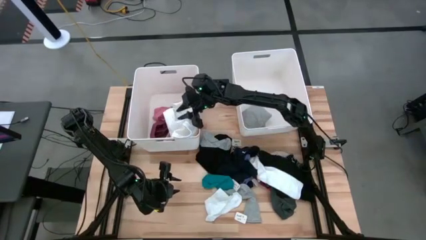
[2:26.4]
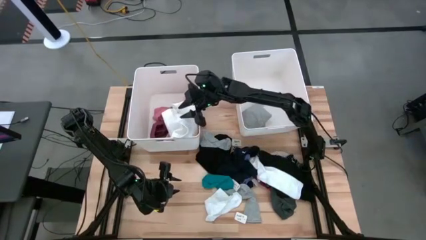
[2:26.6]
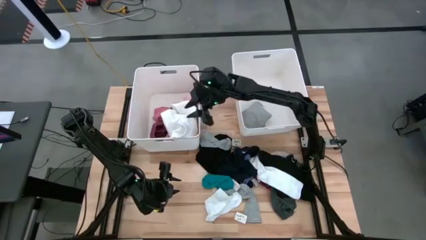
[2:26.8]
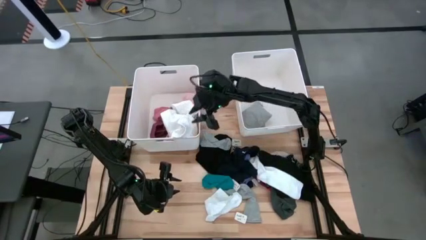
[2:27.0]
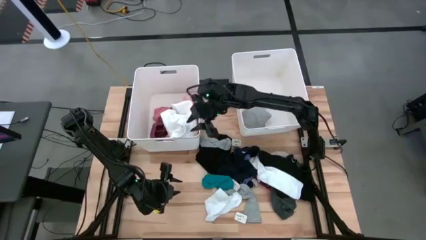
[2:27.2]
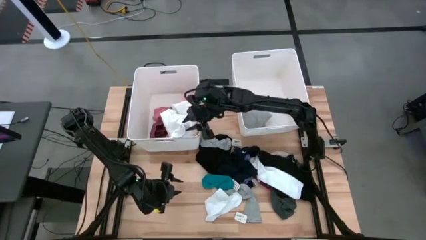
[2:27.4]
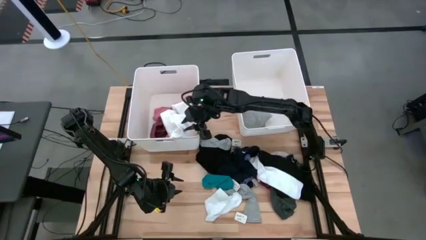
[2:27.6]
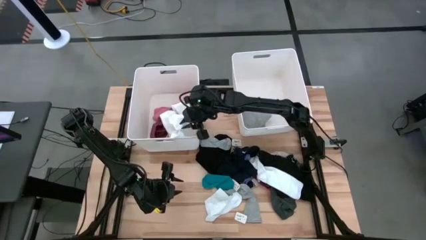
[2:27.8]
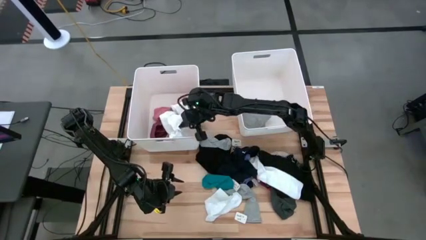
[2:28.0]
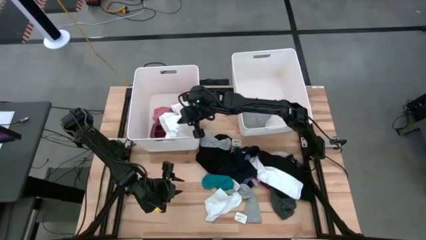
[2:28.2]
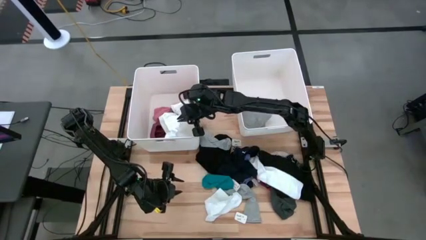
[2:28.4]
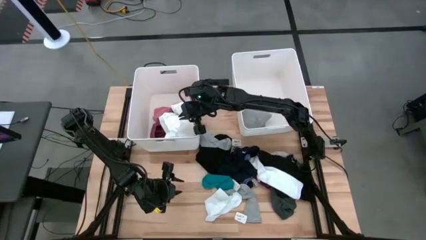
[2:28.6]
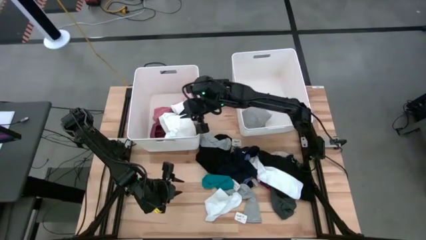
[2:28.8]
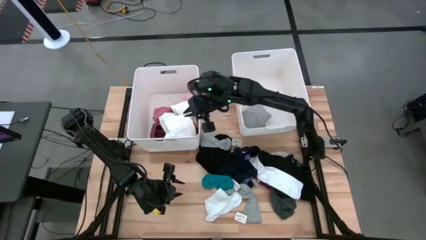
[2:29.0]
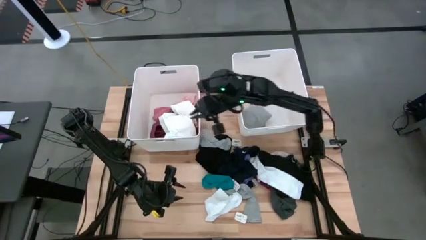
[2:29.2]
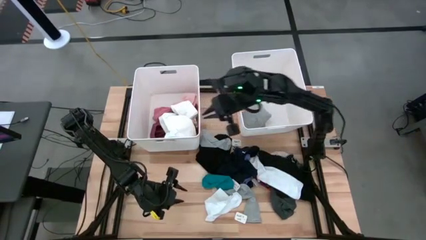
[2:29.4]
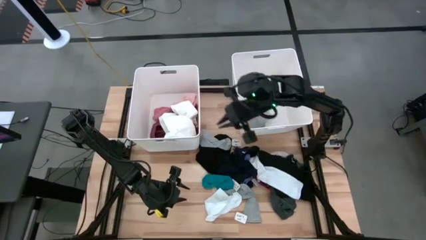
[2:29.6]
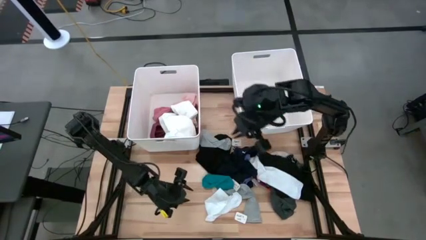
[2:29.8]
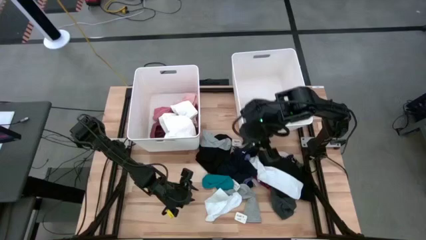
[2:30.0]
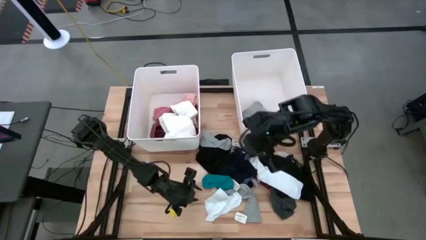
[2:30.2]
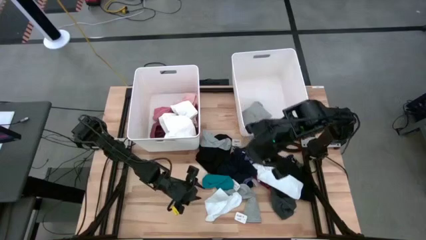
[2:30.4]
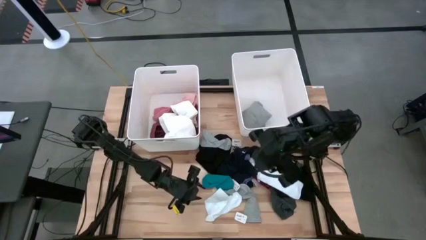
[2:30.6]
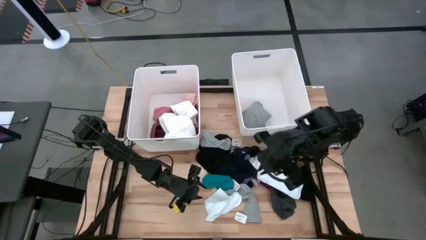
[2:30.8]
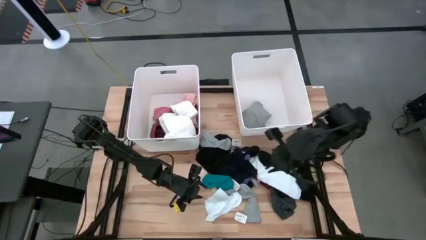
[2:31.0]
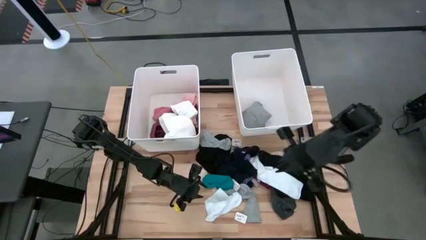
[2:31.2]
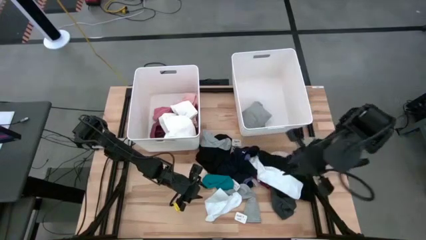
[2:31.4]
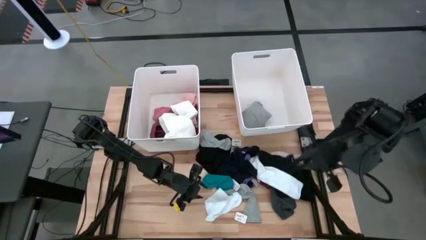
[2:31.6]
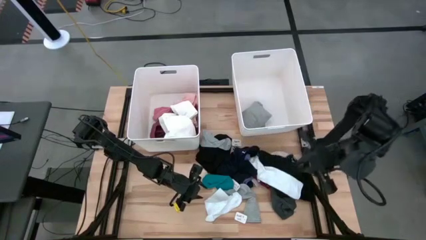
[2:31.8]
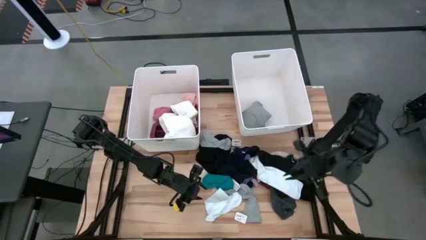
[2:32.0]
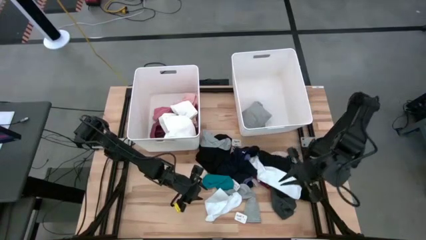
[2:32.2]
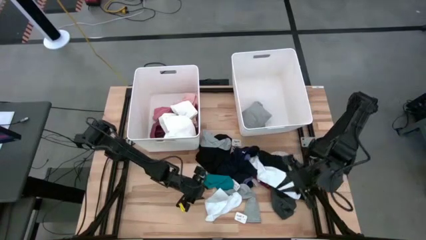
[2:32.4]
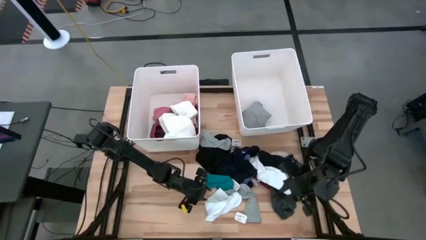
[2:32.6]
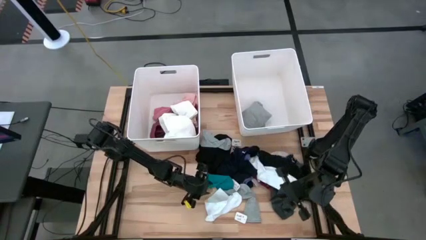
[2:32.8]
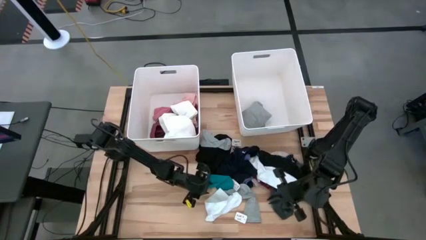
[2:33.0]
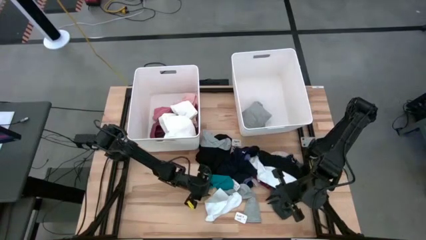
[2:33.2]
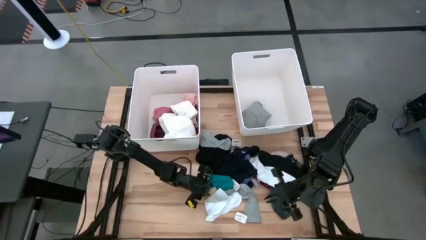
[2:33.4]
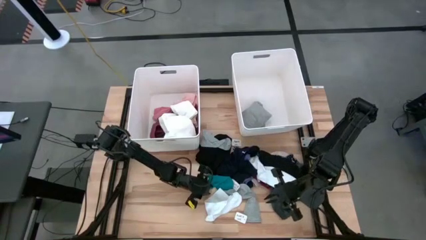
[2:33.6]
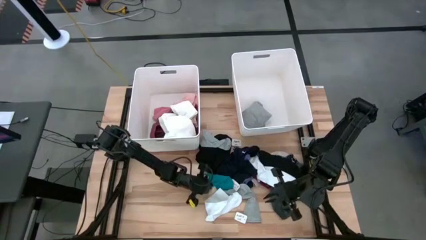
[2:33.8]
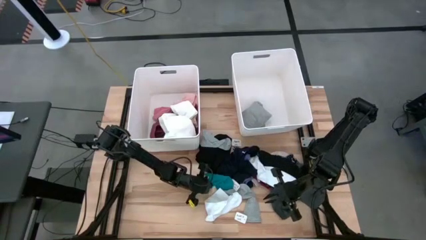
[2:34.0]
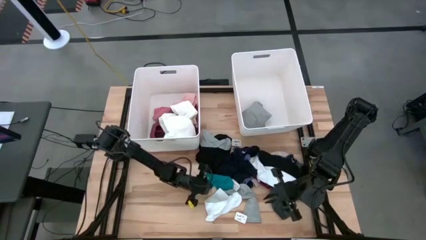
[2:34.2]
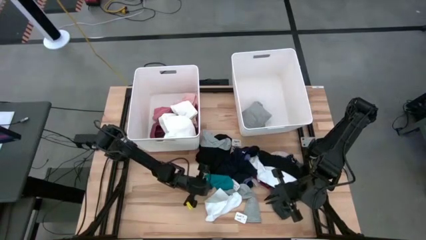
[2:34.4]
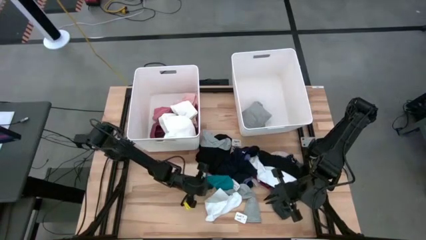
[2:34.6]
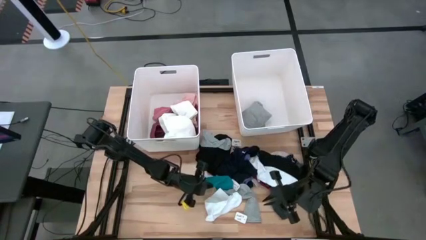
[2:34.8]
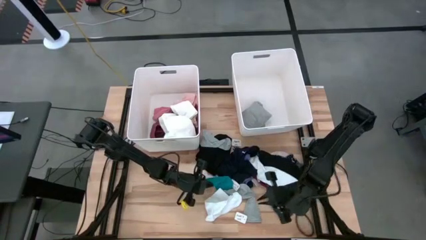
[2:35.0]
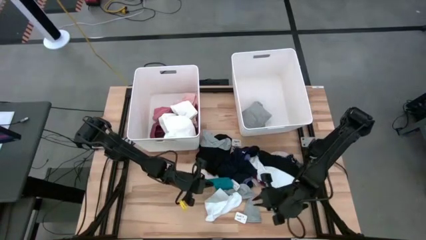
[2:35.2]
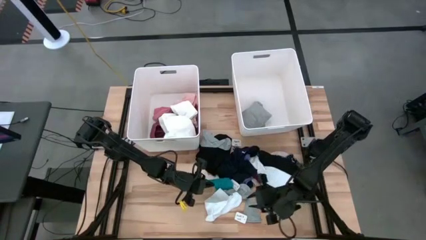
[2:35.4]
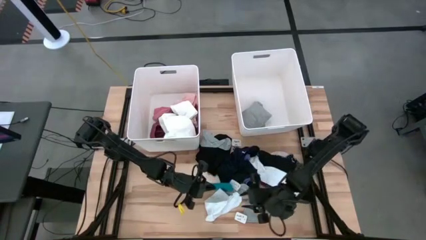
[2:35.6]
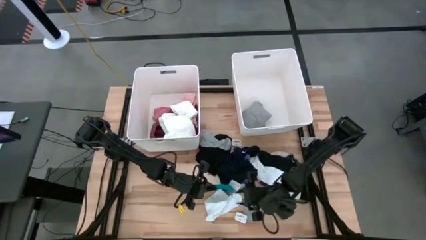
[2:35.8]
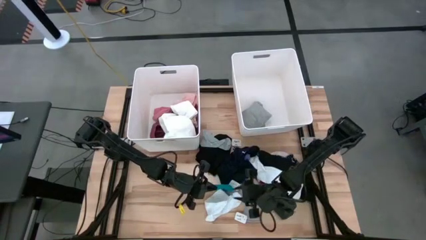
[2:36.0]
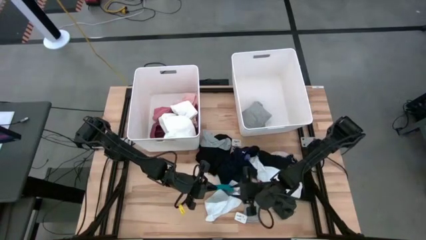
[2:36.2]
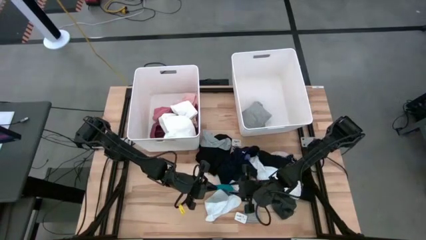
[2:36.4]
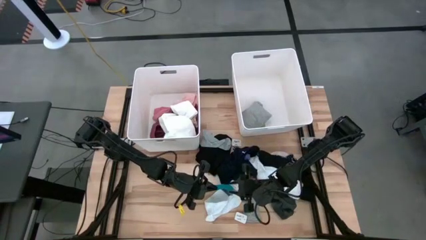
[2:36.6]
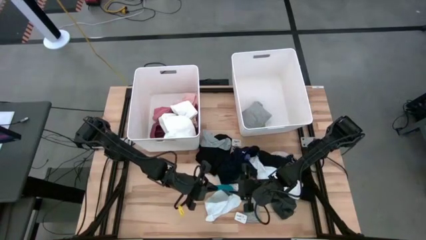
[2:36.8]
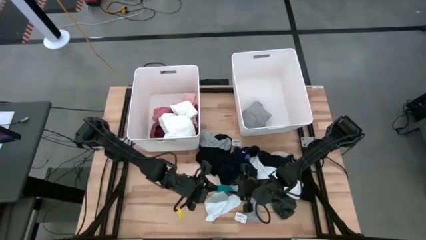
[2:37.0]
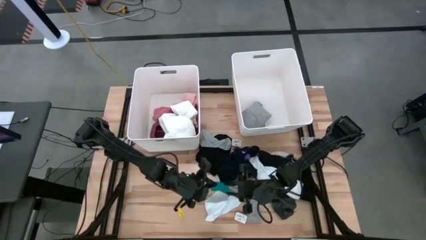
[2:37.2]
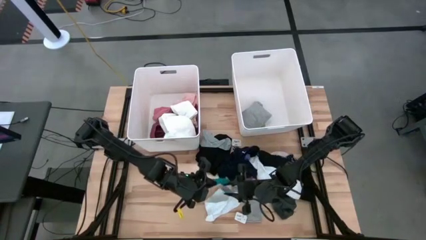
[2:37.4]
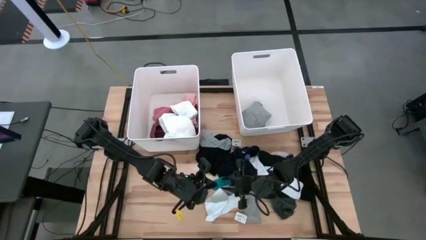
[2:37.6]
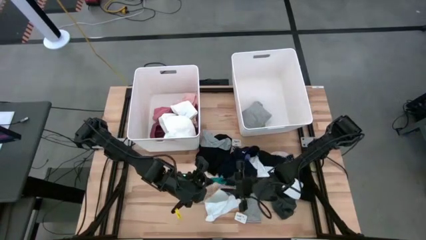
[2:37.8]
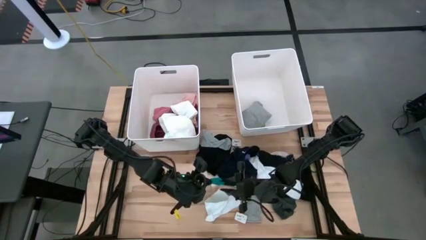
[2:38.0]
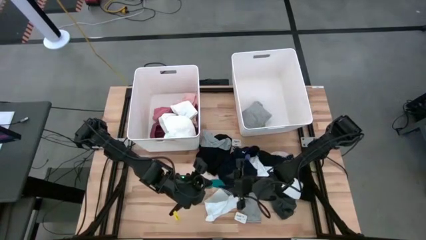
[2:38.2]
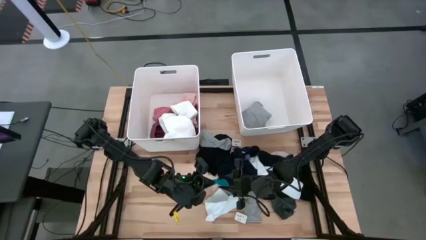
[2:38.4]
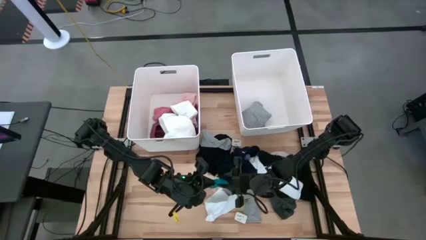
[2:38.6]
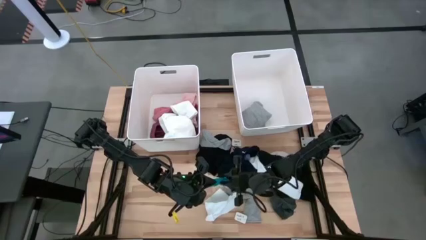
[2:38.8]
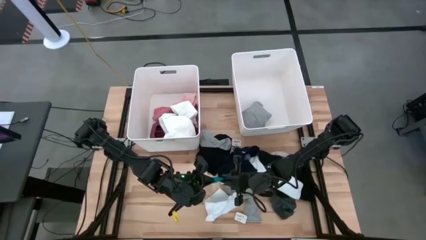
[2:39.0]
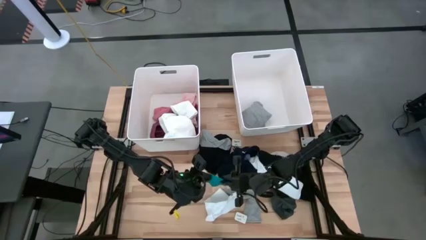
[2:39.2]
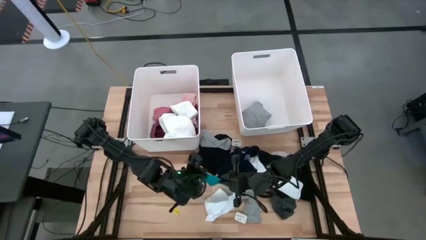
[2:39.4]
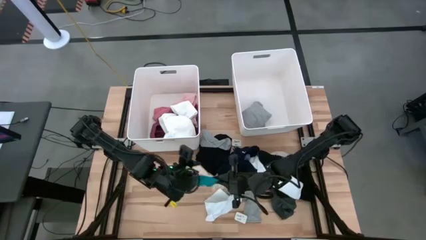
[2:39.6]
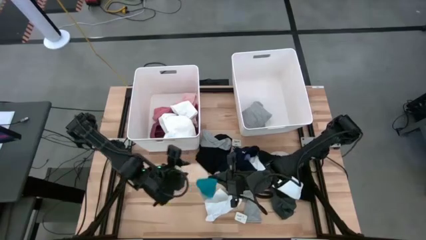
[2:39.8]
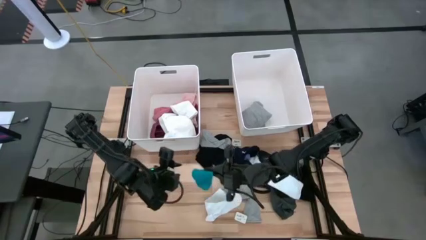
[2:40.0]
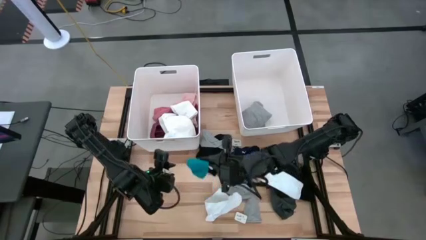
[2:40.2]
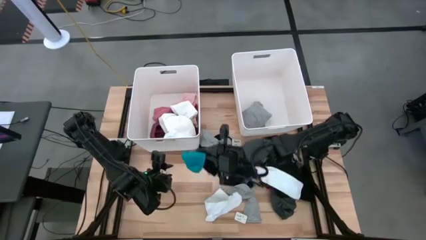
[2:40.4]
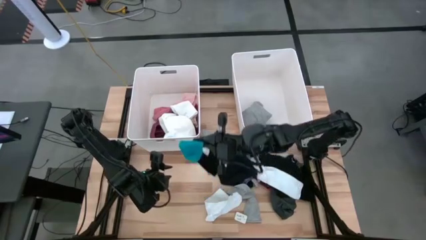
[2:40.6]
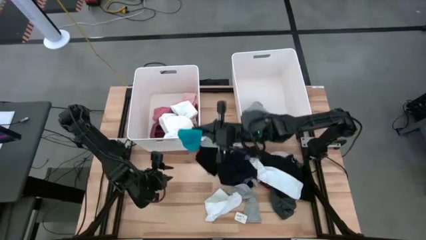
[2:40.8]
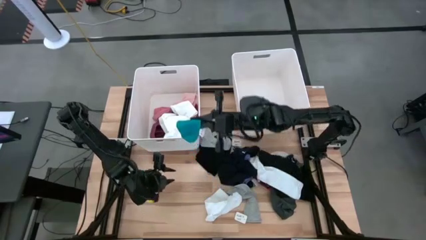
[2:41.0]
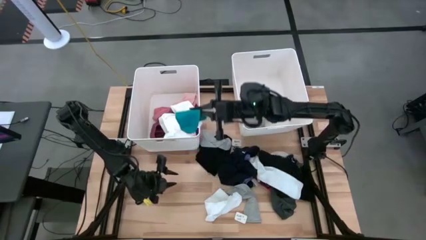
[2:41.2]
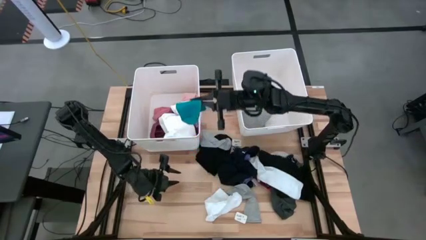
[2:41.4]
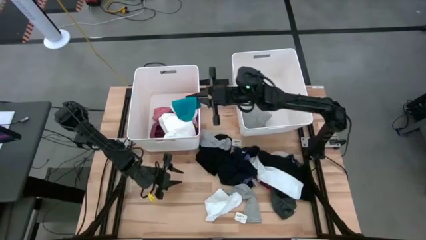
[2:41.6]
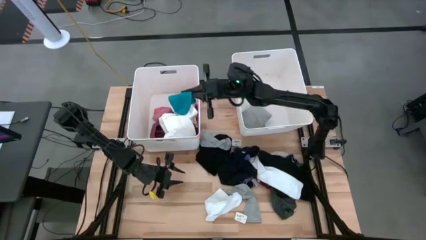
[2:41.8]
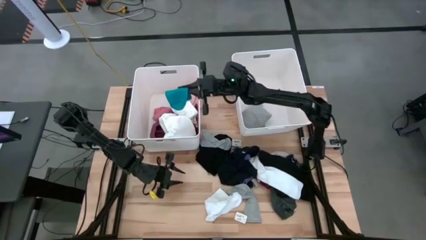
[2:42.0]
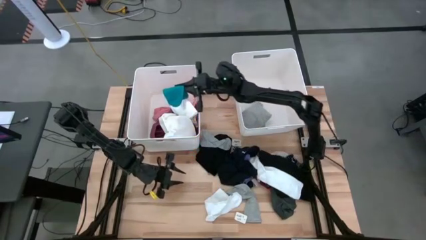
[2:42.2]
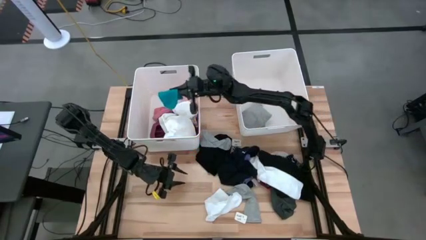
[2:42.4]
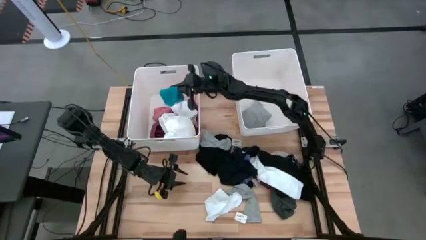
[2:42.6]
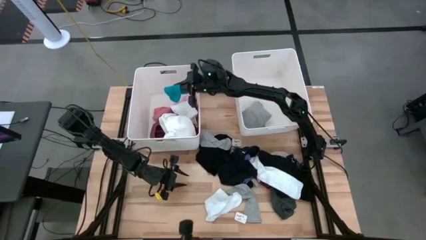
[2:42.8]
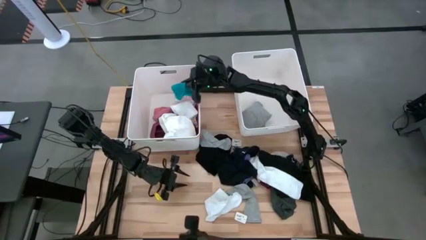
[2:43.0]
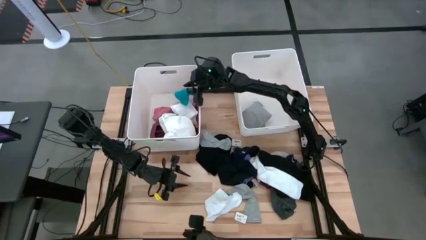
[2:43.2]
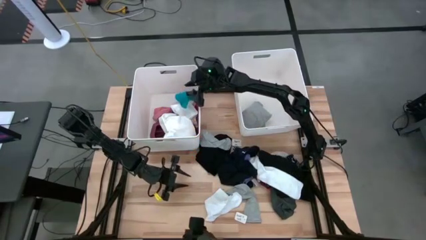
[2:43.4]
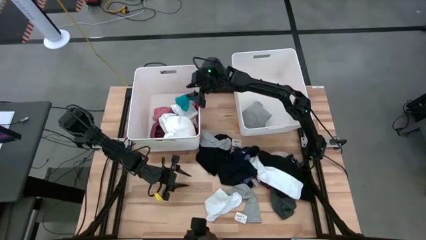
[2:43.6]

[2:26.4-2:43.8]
Task: Sort clothes
Put the blue sock into the left white bin
